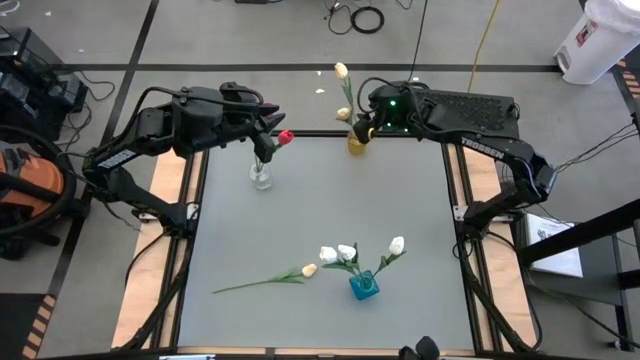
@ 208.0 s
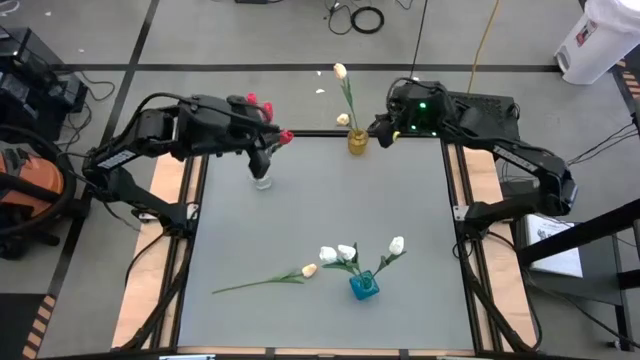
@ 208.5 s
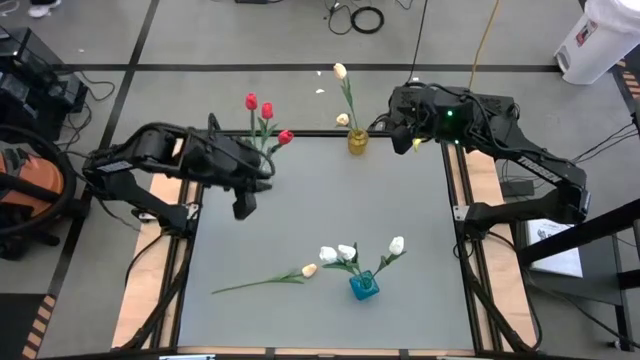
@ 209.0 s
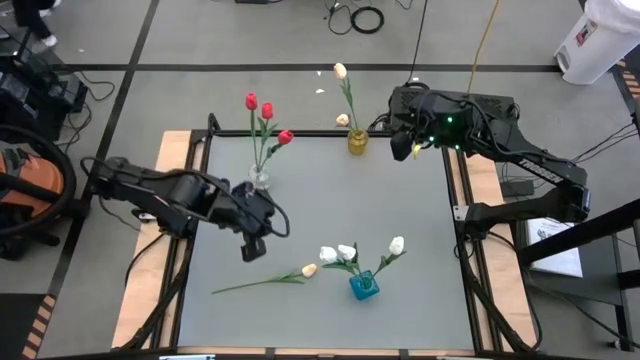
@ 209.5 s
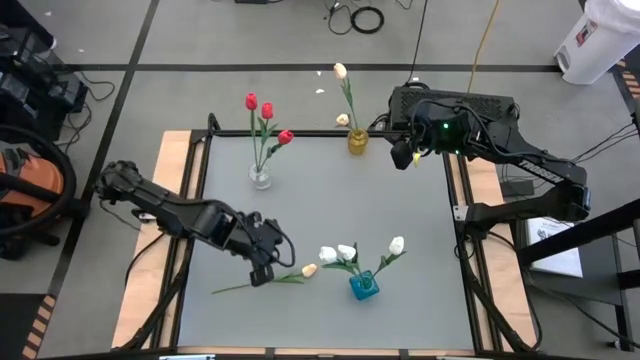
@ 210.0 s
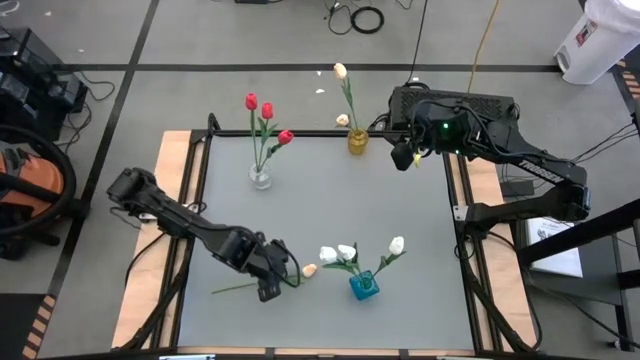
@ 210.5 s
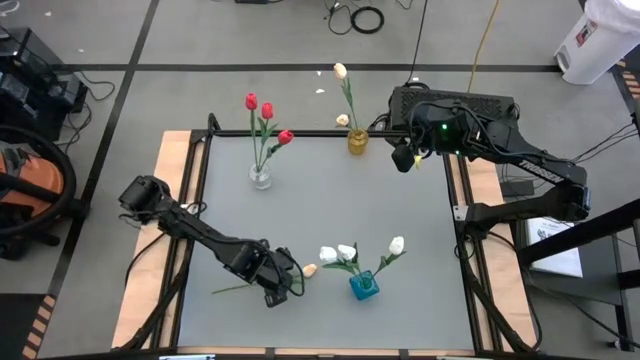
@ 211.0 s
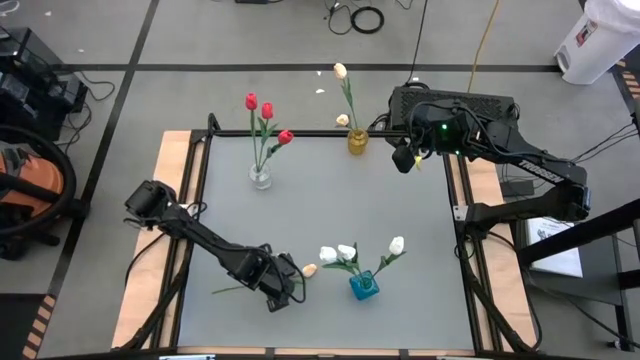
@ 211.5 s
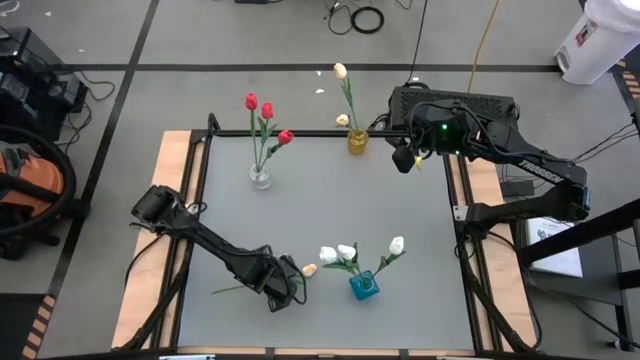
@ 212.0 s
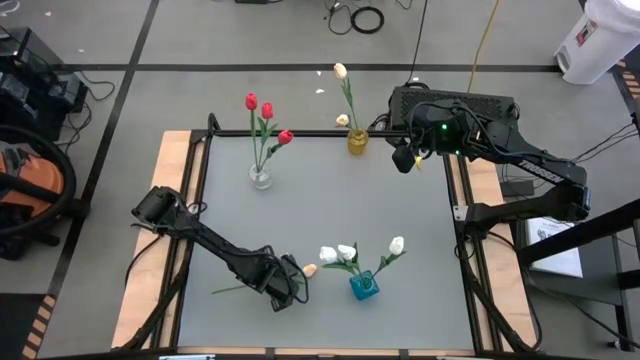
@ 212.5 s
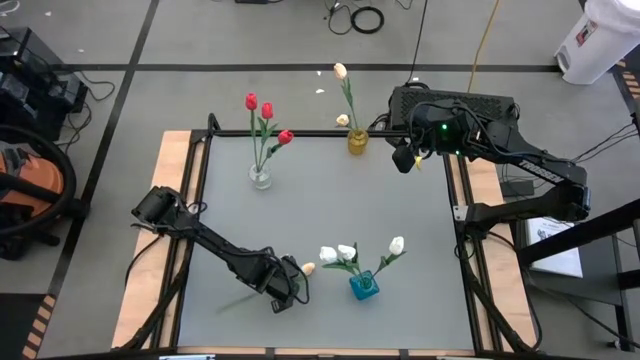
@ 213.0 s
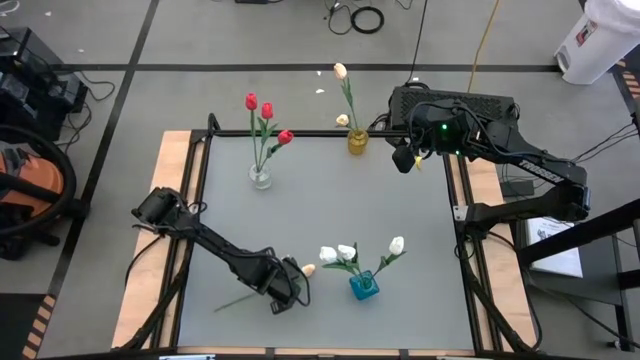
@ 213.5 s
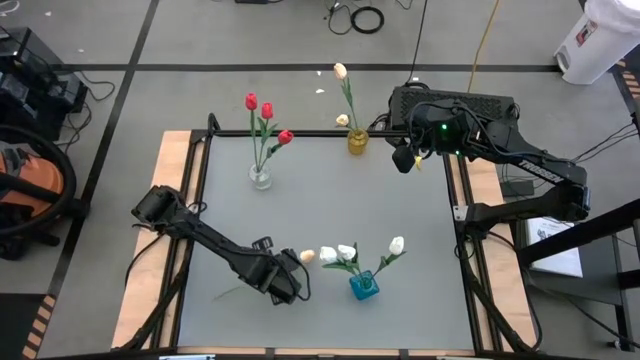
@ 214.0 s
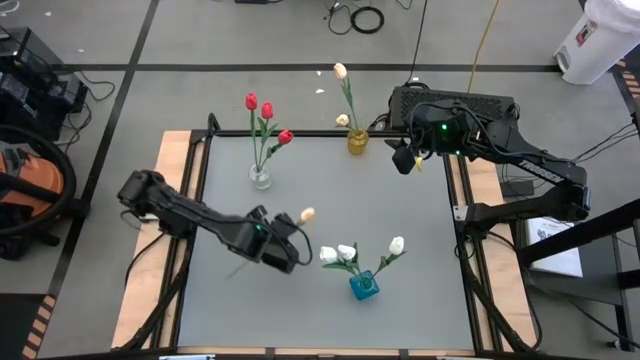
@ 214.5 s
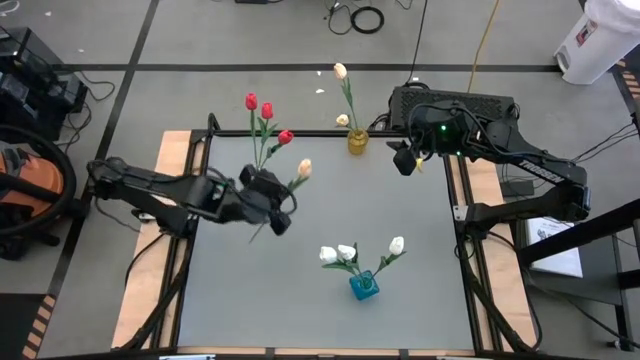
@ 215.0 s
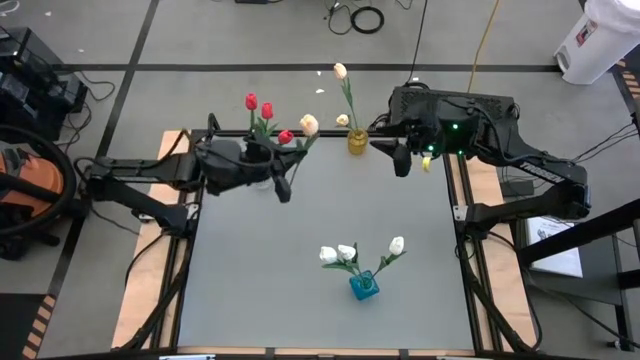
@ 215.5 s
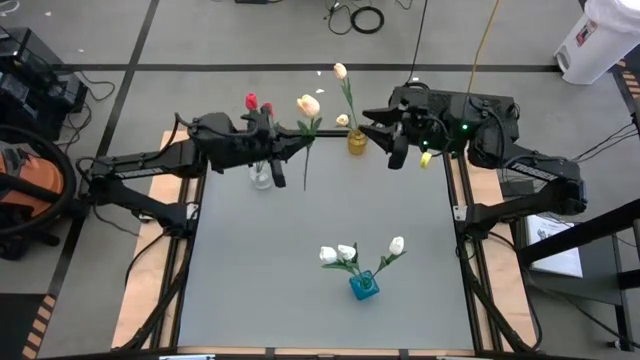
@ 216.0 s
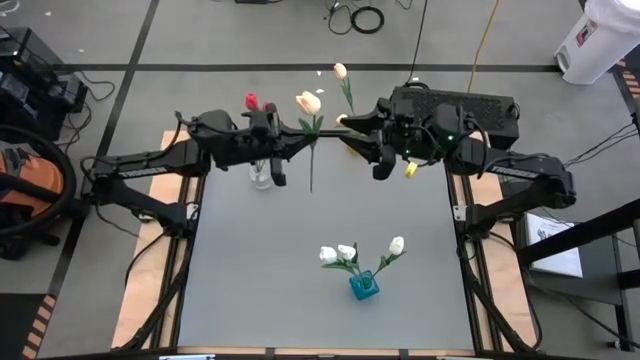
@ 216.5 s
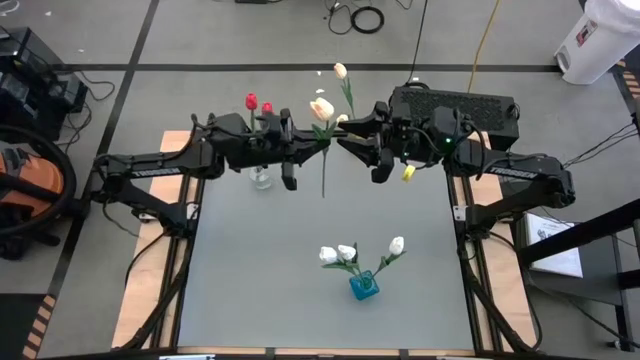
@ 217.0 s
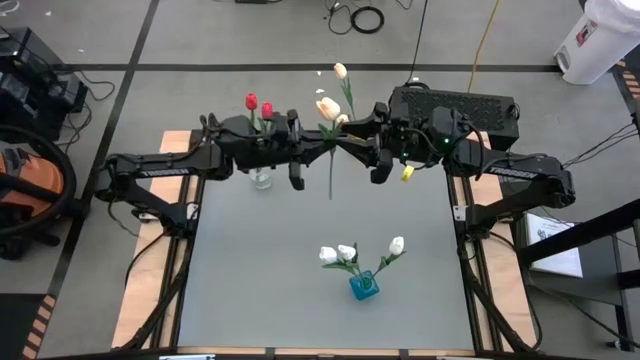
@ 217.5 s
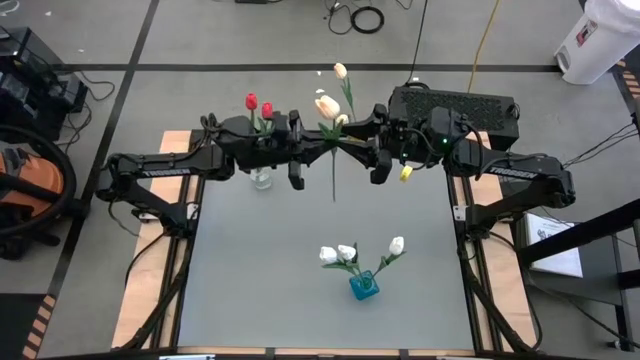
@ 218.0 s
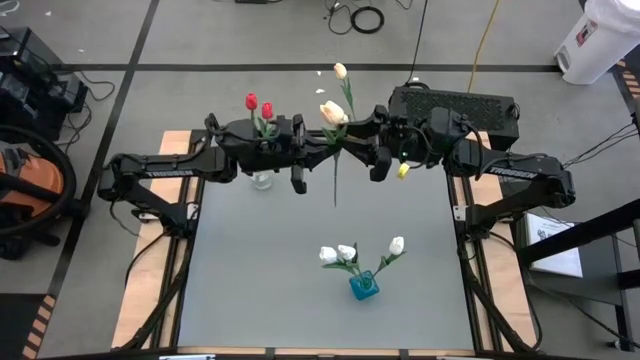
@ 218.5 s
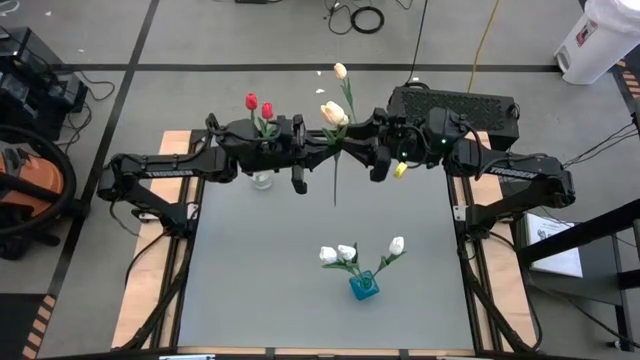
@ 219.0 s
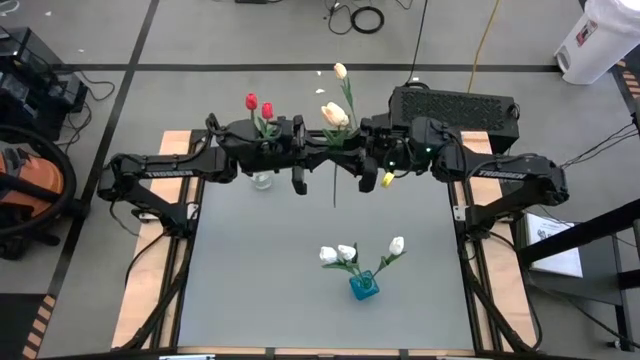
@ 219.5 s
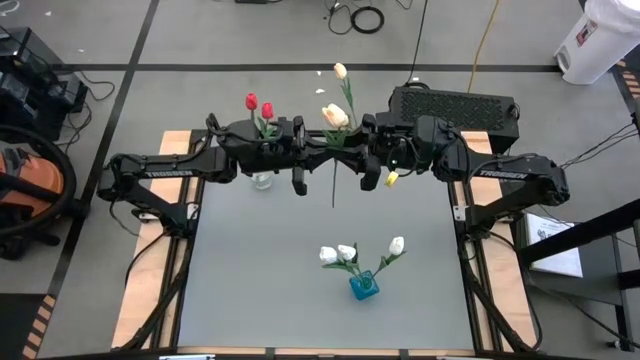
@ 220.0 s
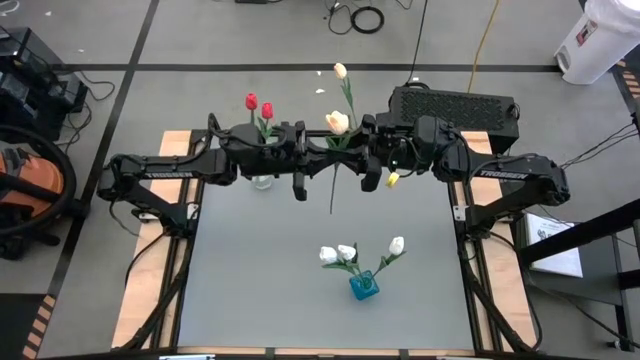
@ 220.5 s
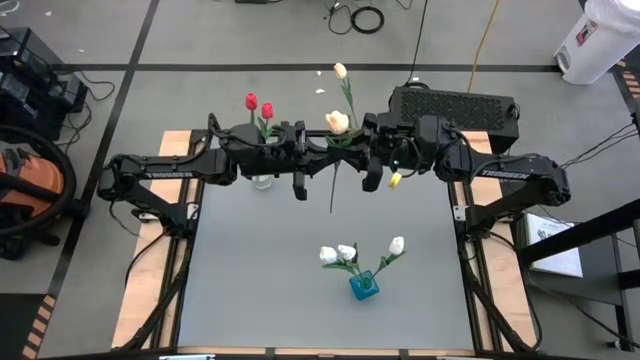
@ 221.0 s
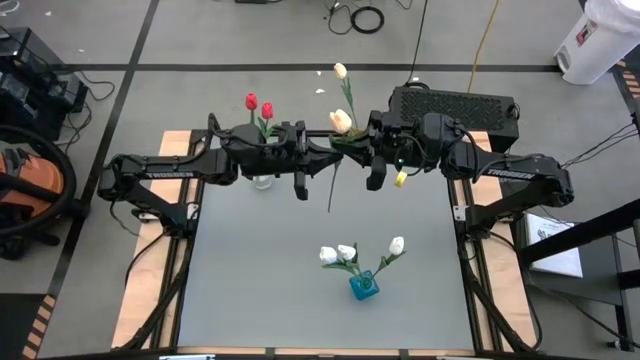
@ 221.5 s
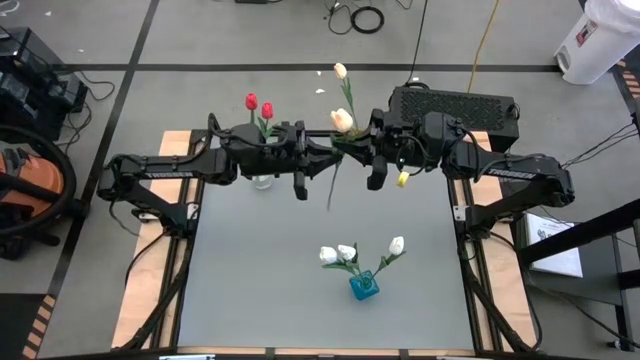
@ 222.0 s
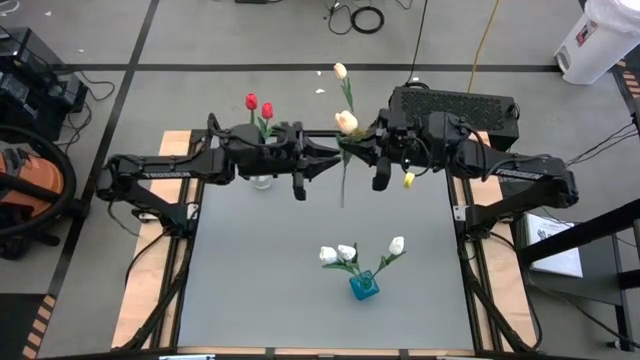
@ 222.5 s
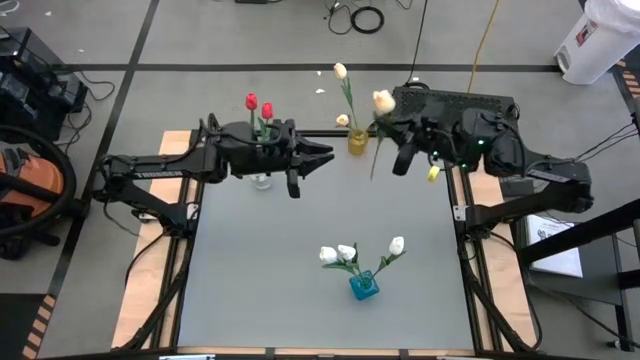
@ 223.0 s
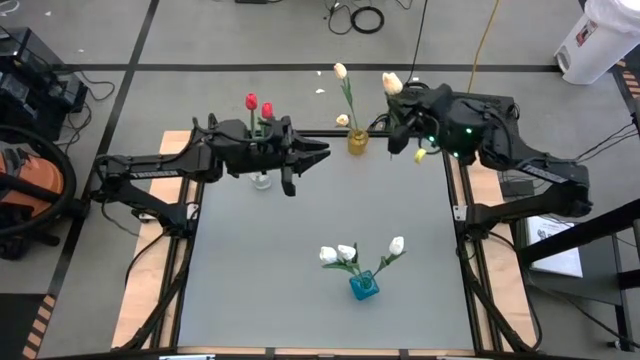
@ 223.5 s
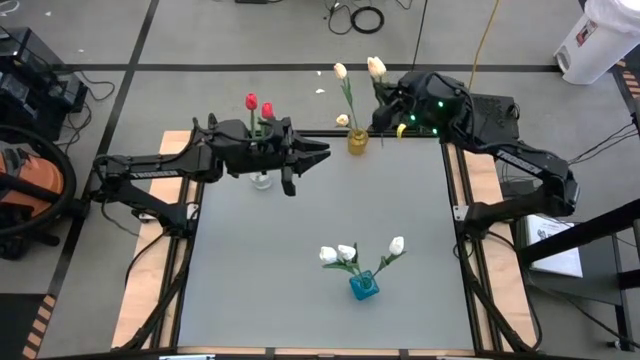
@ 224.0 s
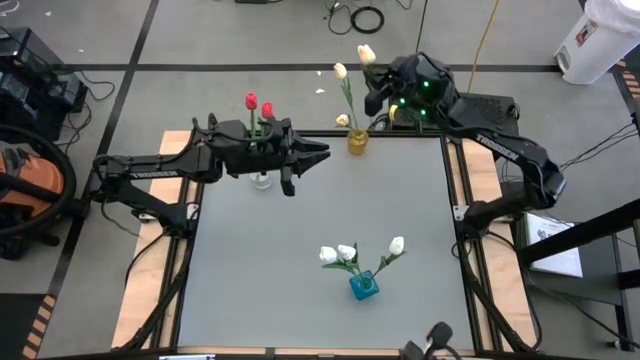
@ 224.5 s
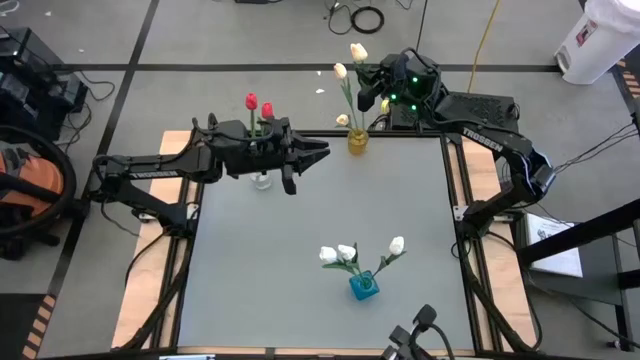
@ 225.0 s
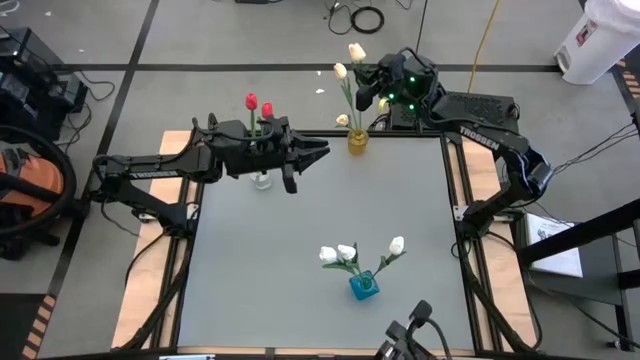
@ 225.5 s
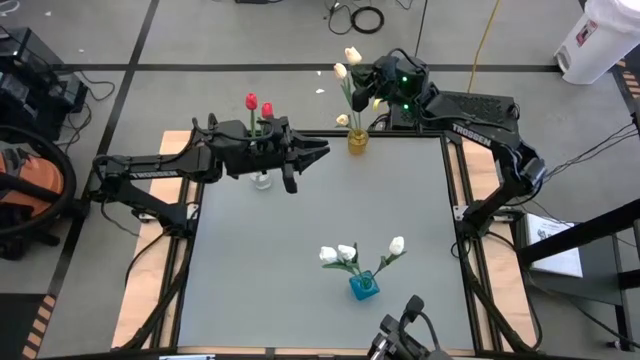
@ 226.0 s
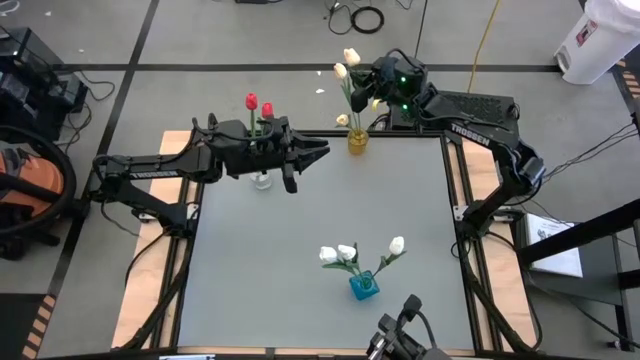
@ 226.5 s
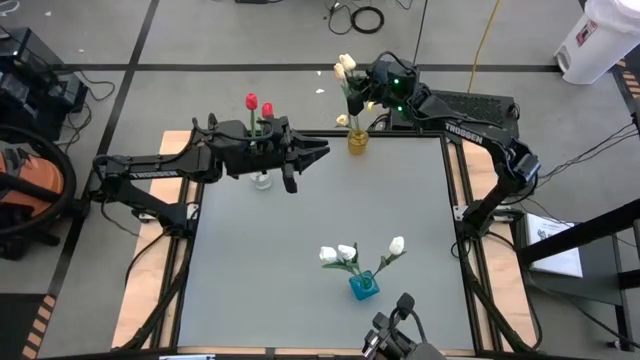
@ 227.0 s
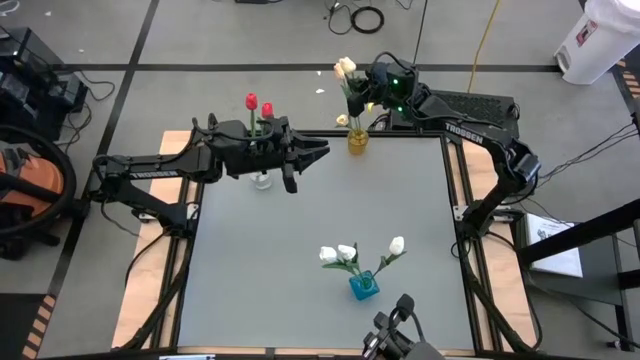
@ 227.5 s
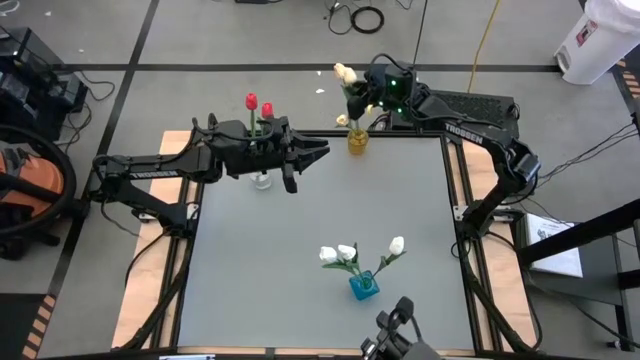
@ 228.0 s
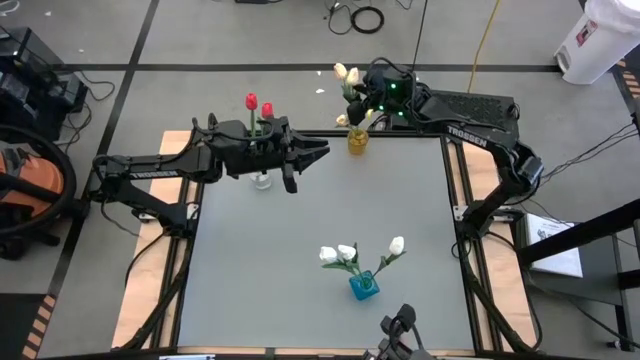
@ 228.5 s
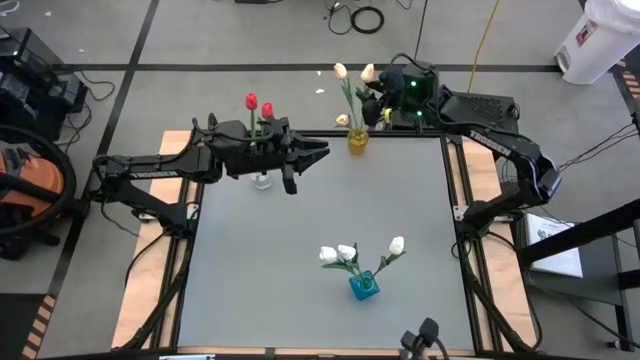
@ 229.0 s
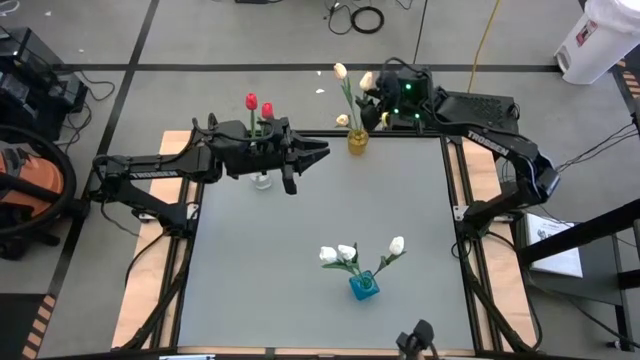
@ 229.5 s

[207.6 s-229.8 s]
Task: Sort flowers into vase by color
Put the light yellow tulip into the yellow vase
